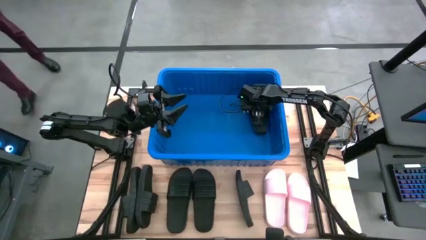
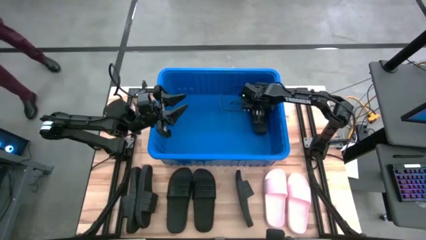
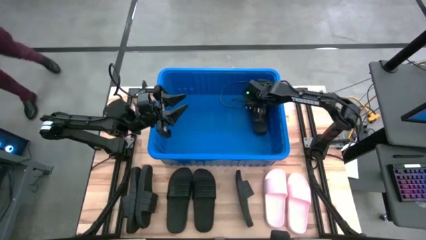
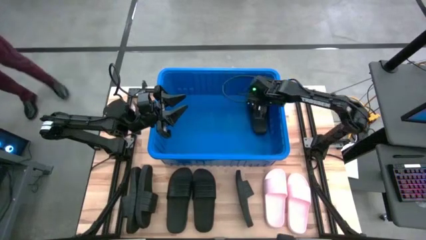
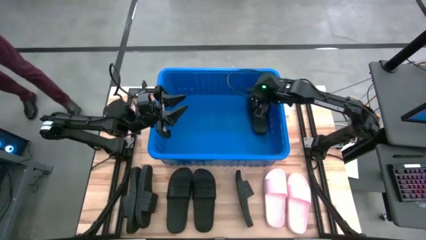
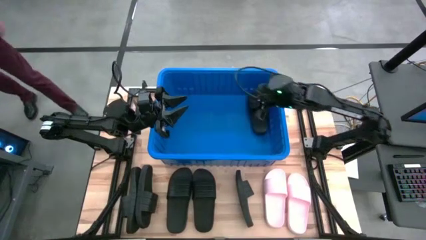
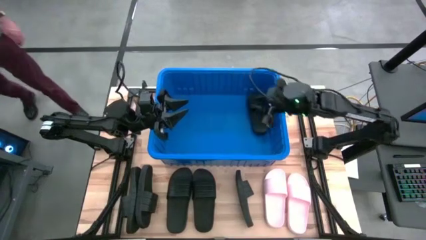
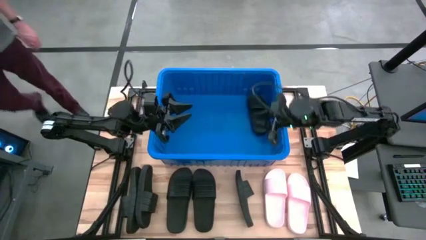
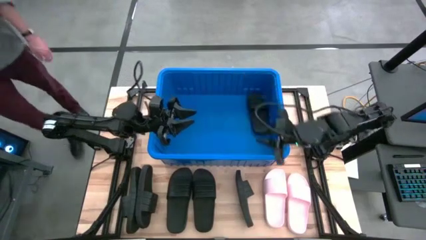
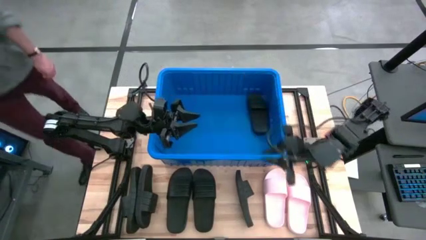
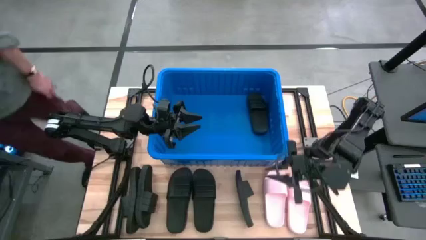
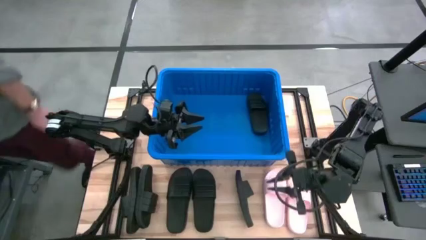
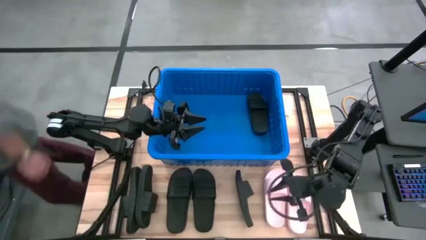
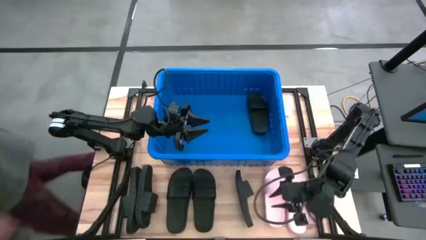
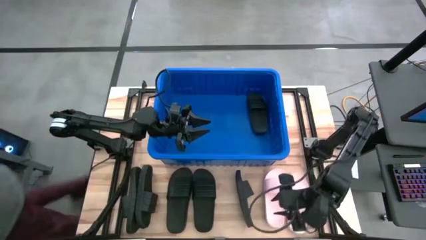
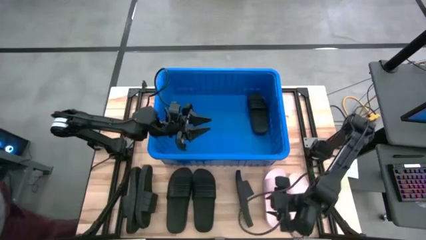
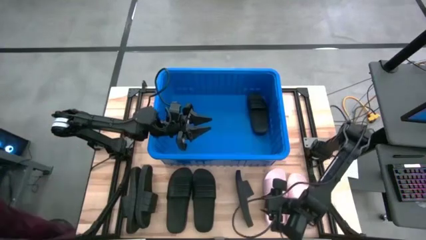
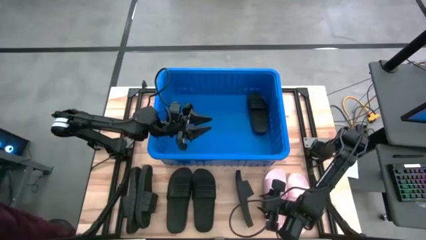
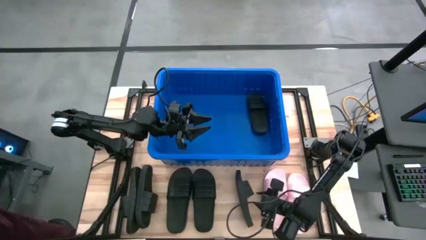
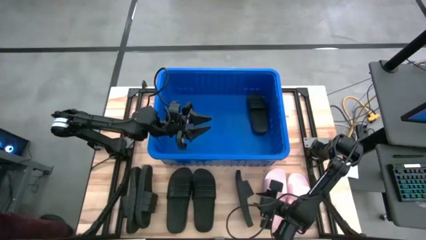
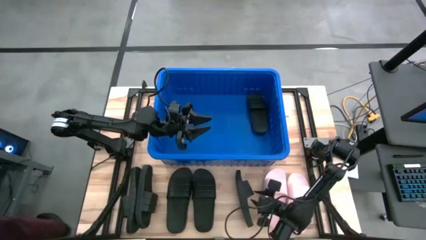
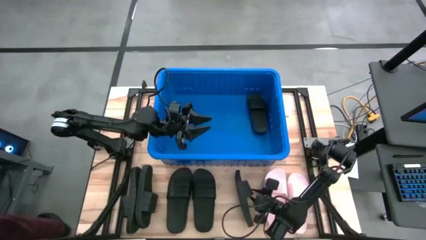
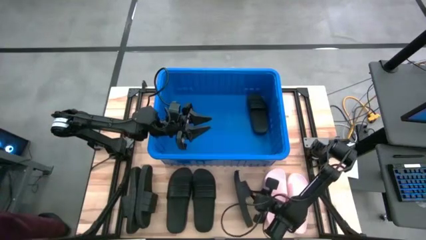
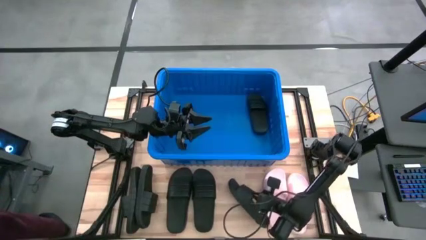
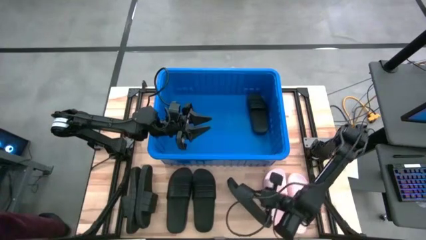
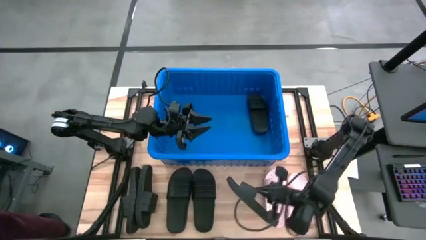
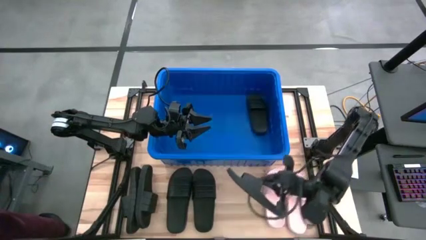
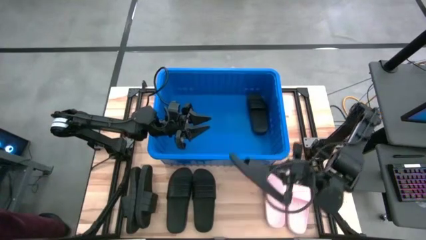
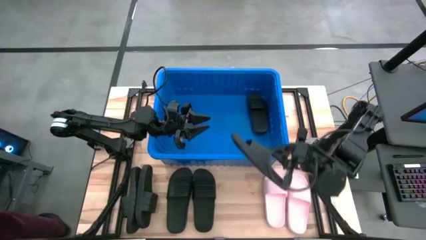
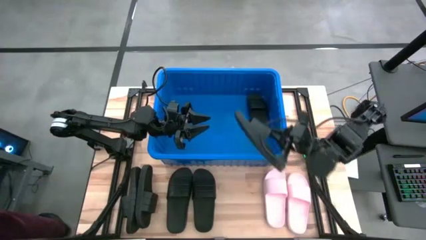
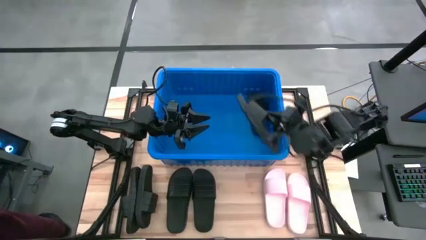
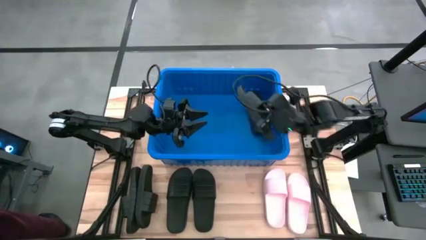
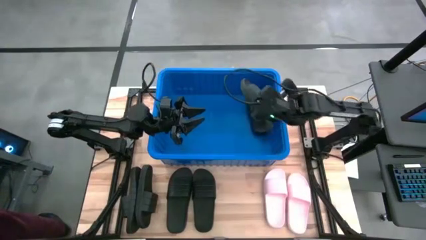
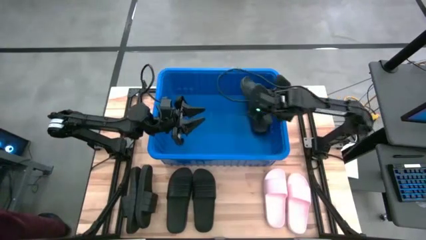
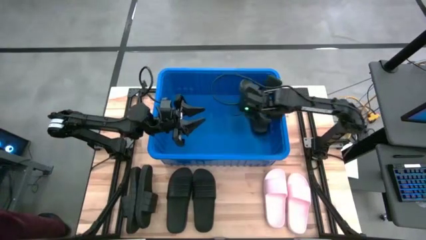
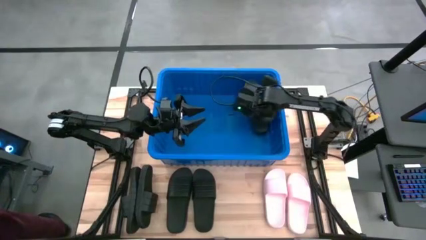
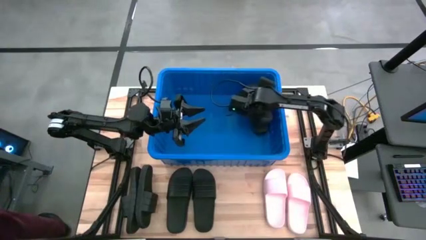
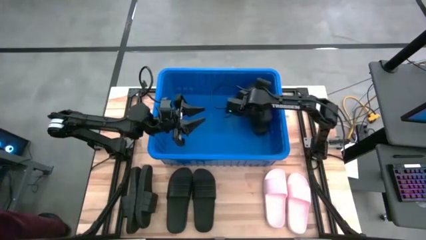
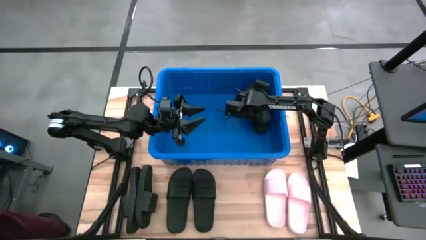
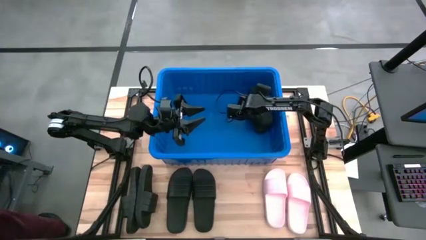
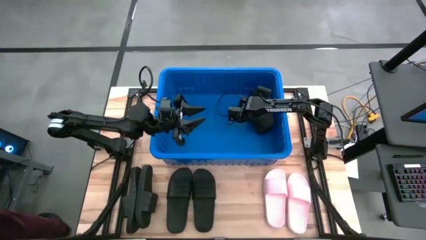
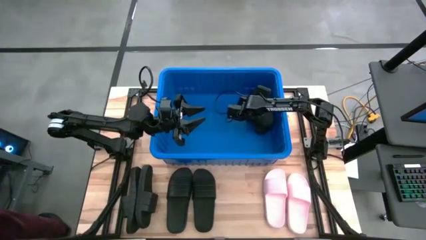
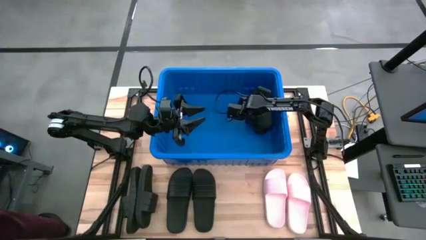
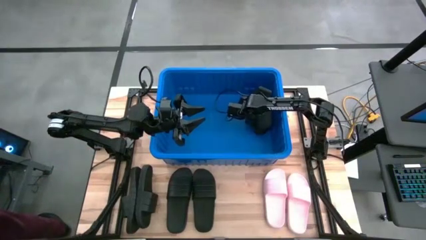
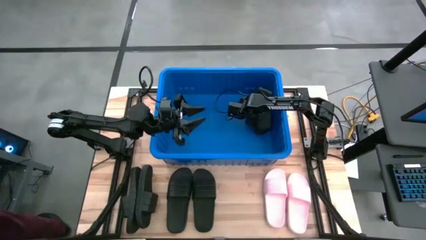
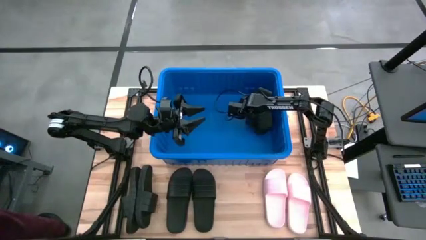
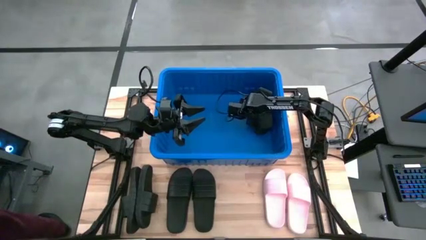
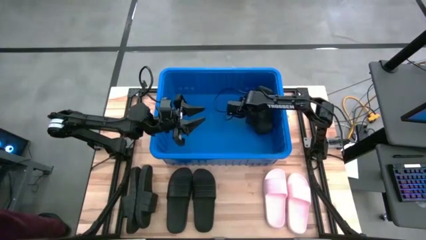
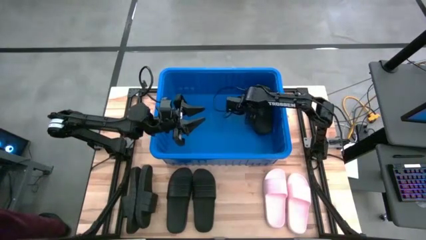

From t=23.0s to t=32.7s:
Task: Pick and place slides into bin
Put the black slide into the blue container

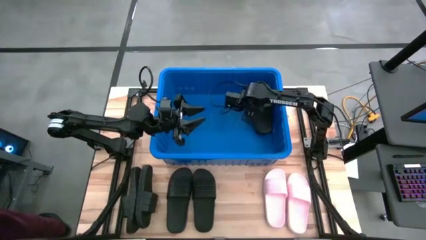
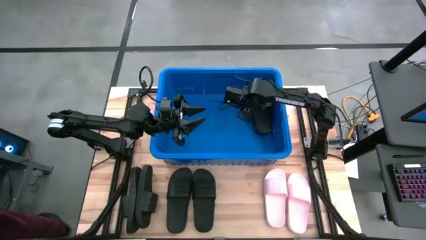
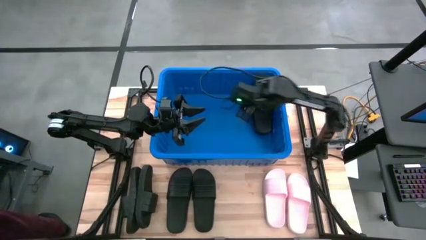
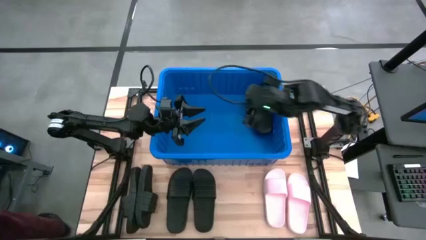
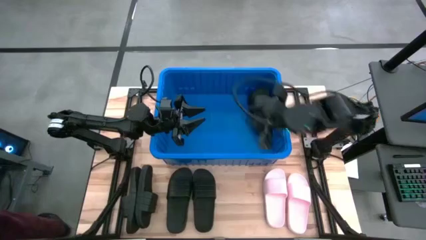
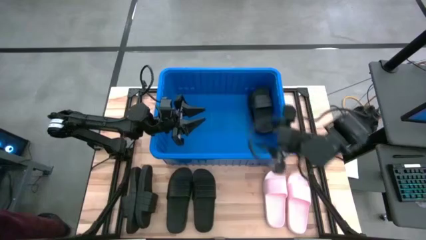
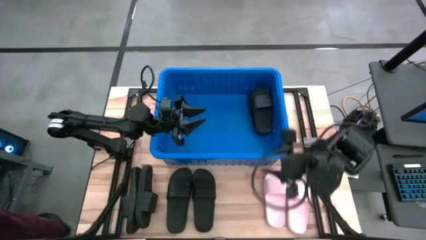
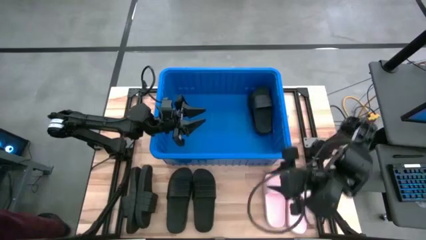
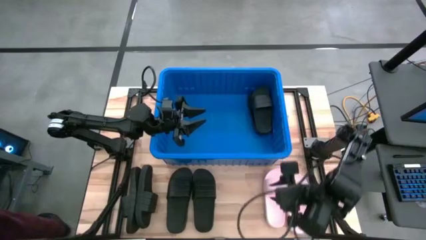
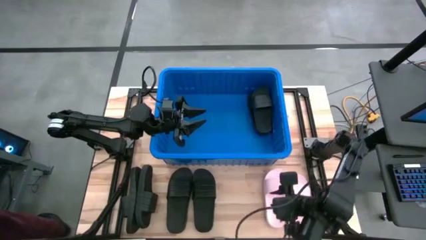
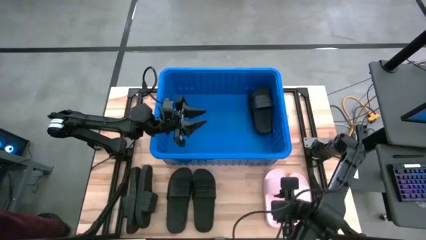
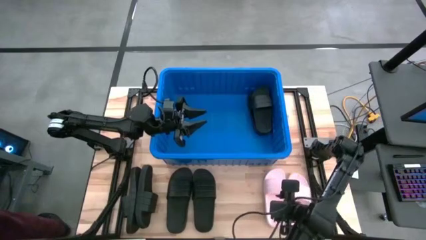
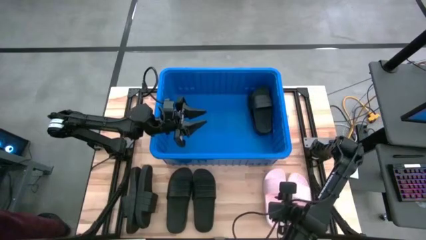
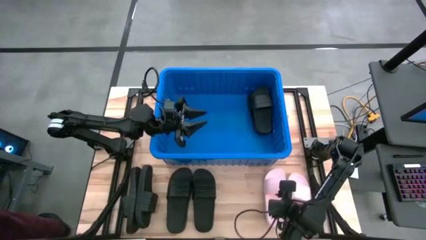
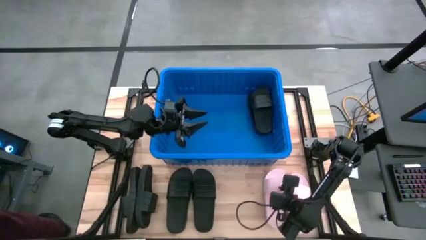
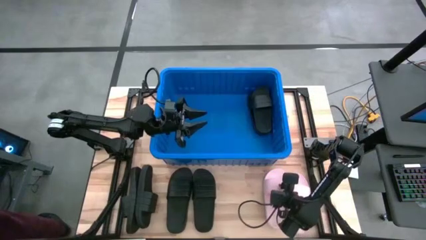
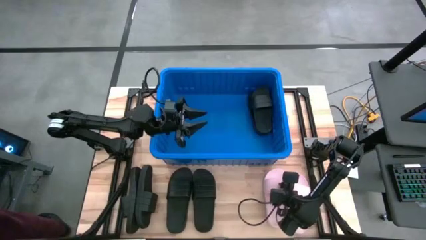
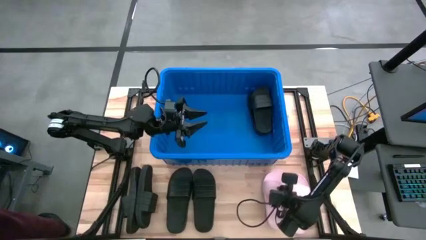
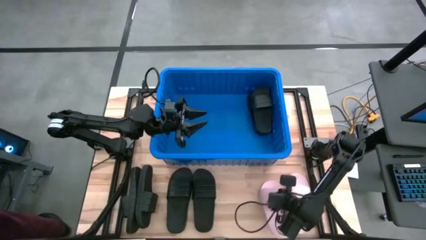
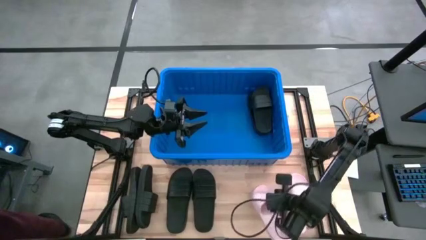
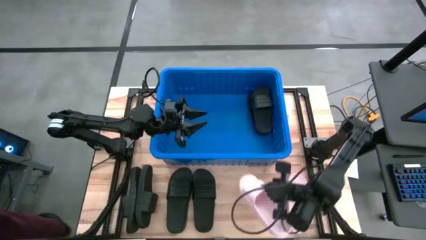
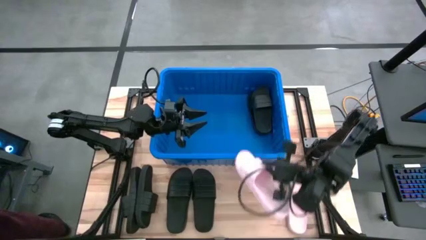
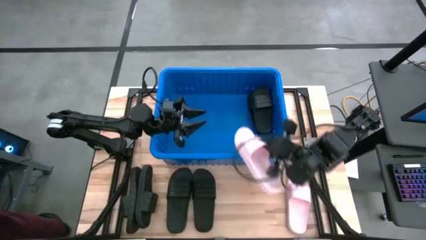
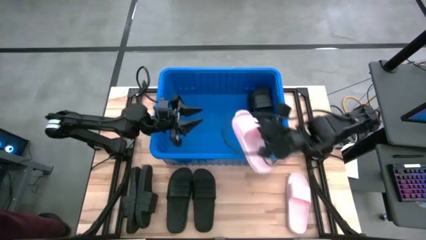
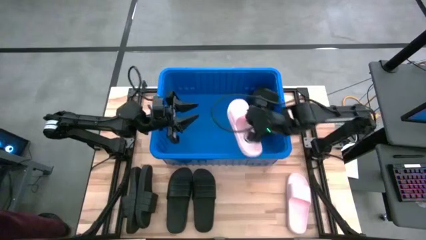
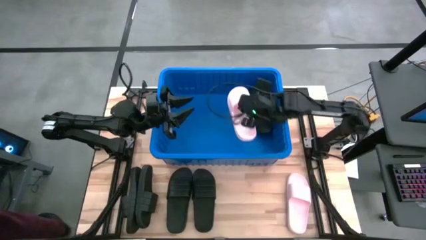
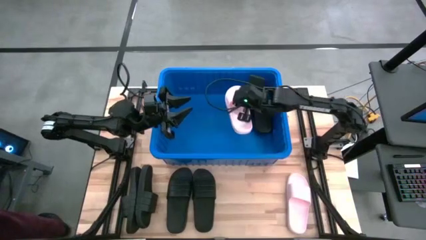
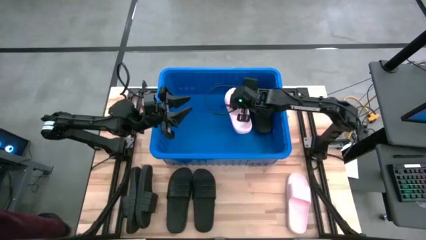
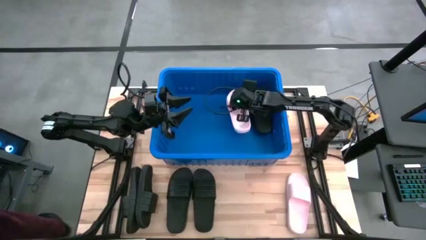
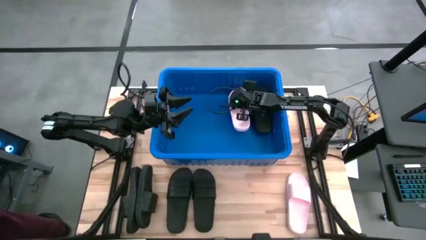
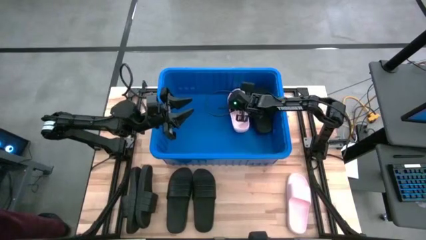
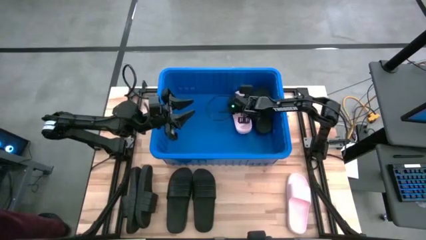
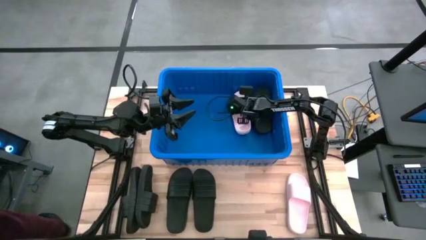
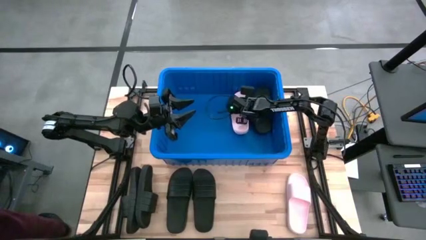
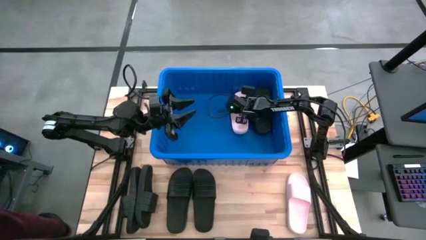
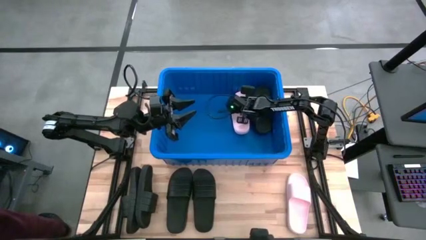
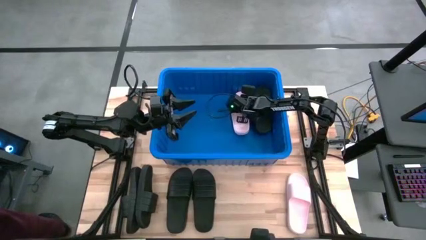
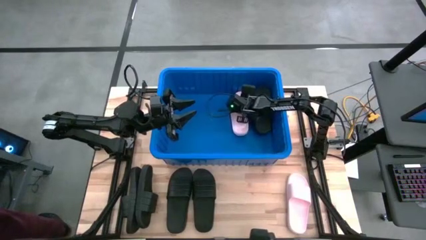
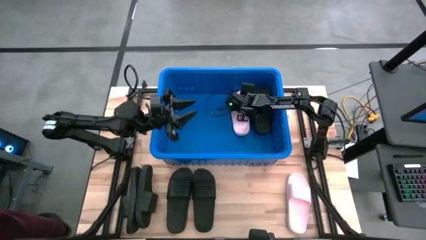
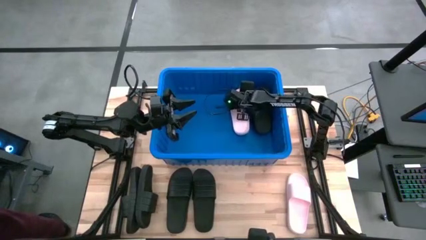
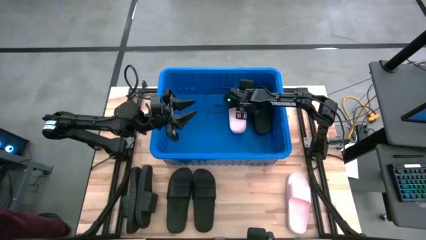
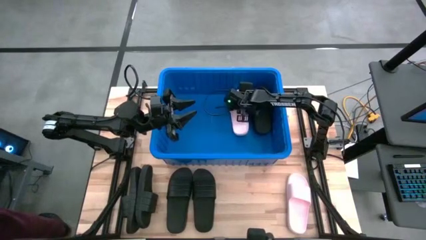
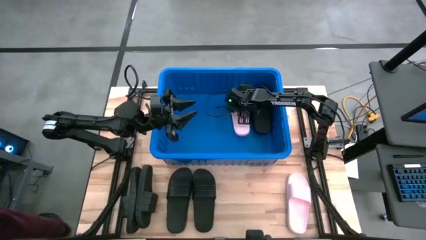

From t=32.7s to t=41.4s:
Put the pink slide into the blue container
